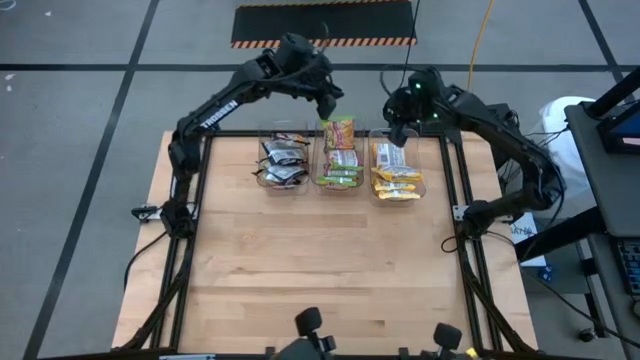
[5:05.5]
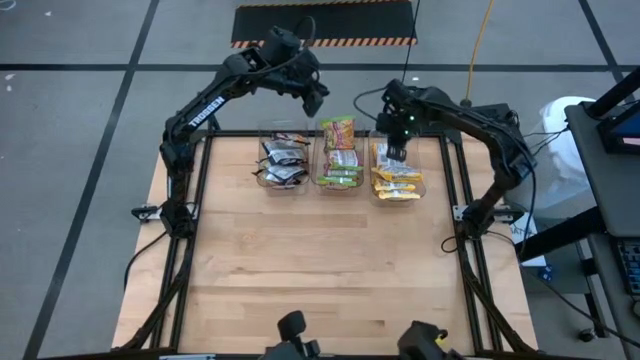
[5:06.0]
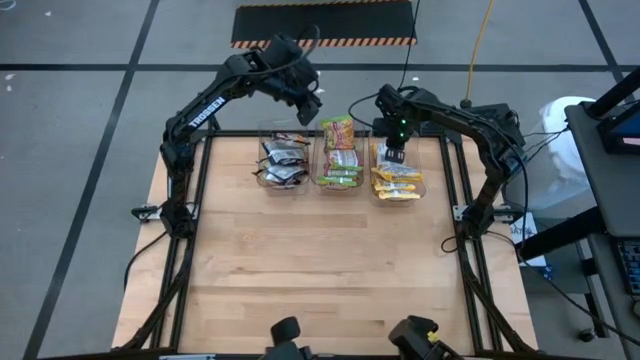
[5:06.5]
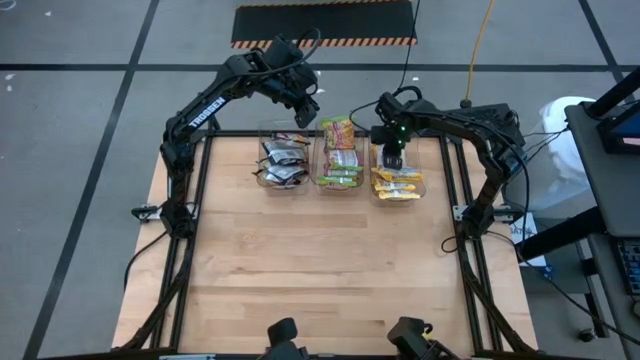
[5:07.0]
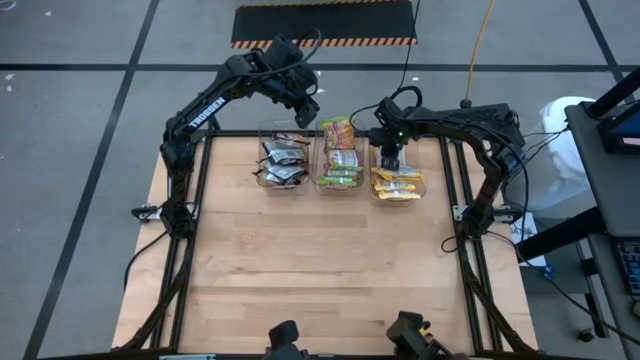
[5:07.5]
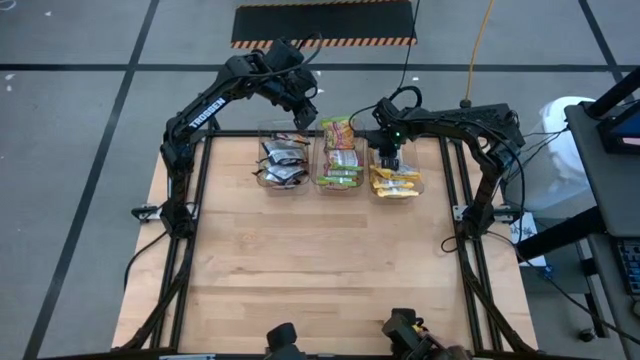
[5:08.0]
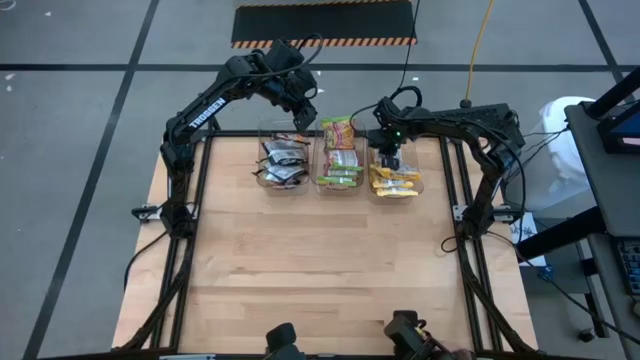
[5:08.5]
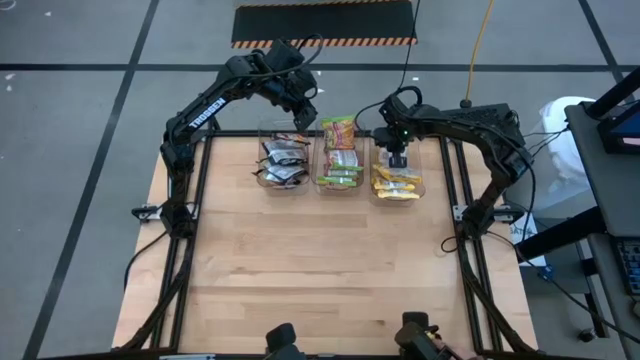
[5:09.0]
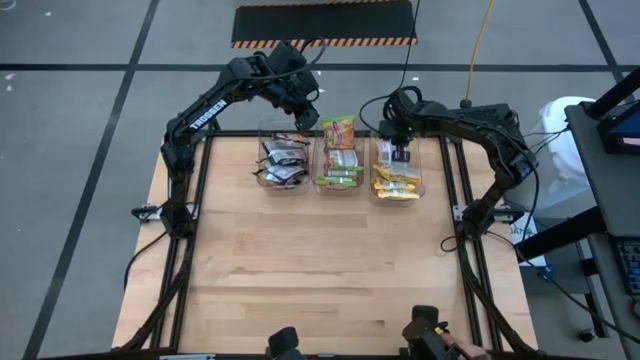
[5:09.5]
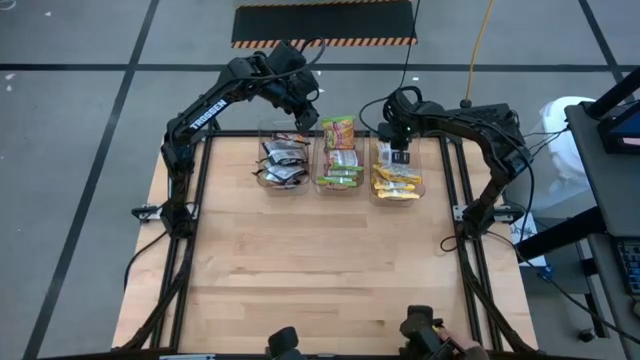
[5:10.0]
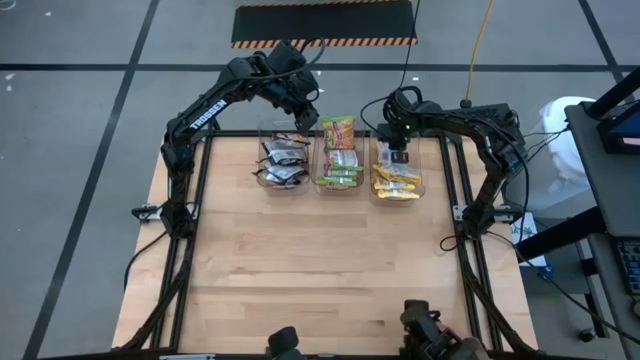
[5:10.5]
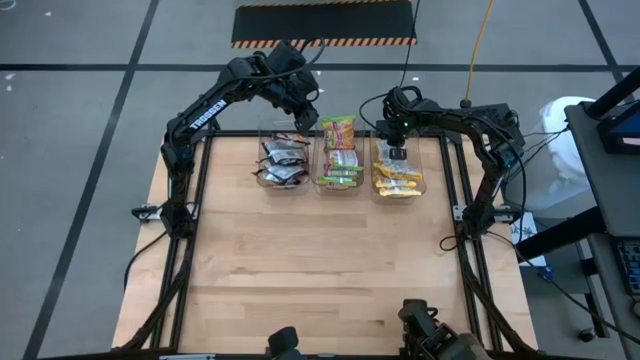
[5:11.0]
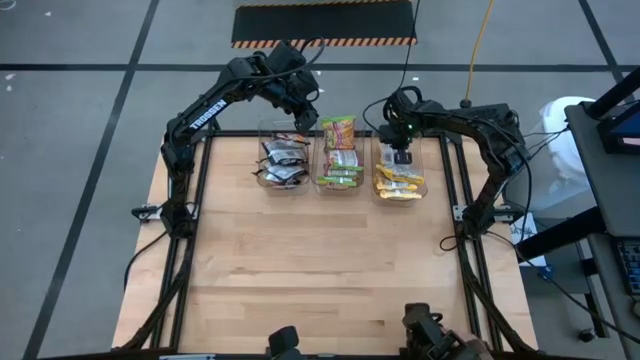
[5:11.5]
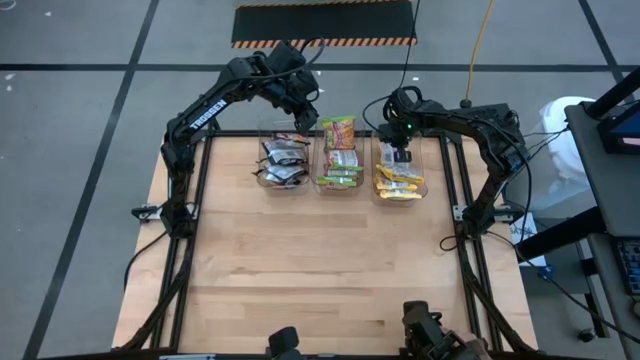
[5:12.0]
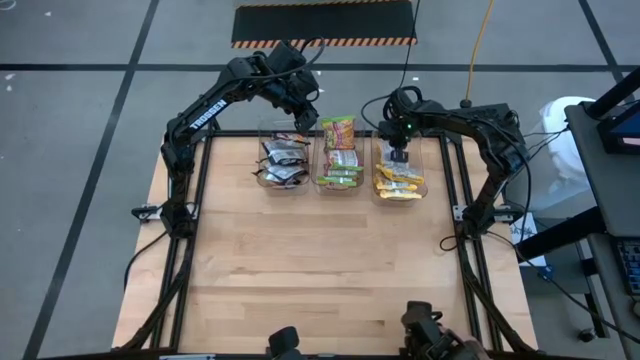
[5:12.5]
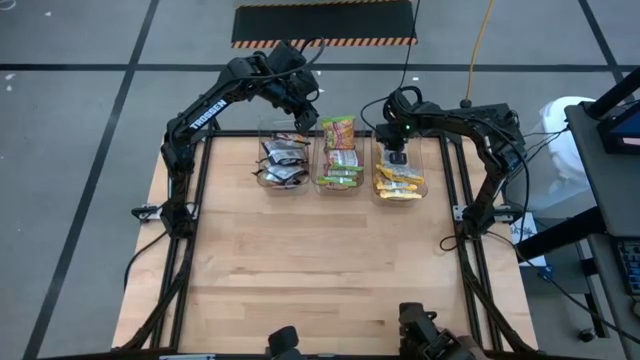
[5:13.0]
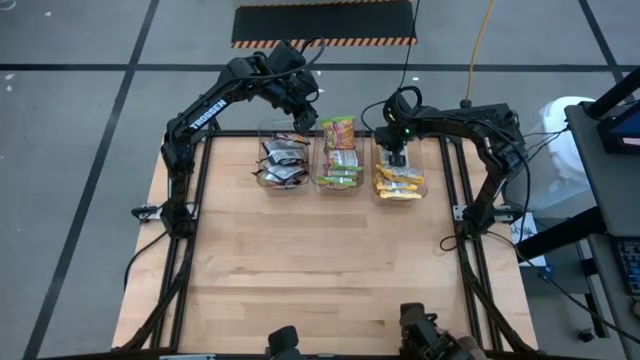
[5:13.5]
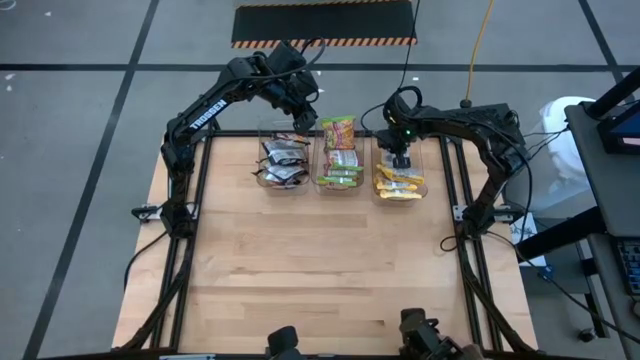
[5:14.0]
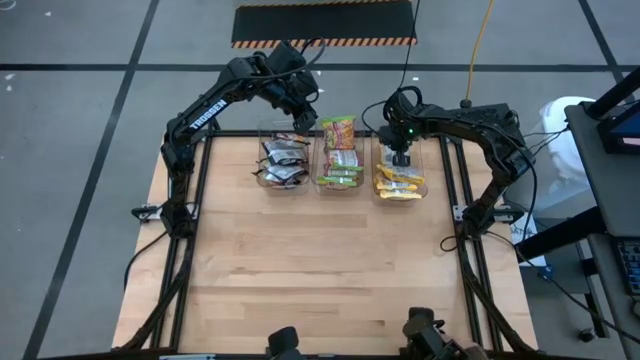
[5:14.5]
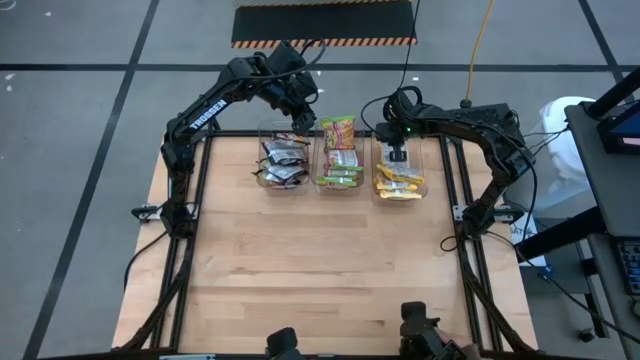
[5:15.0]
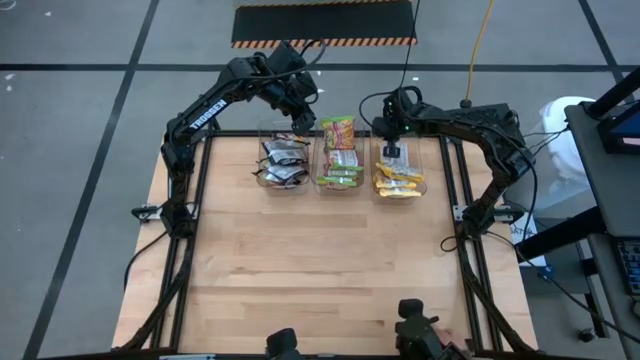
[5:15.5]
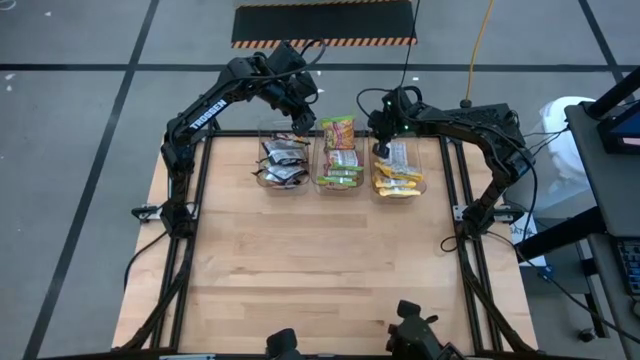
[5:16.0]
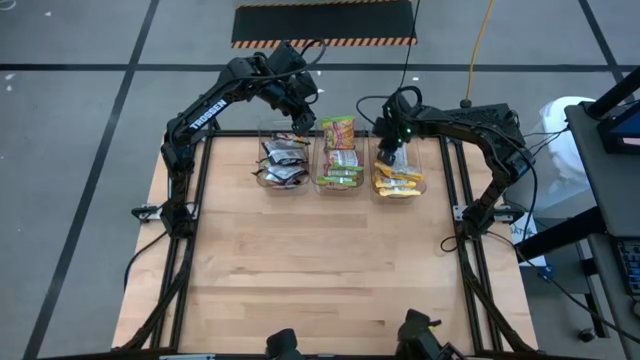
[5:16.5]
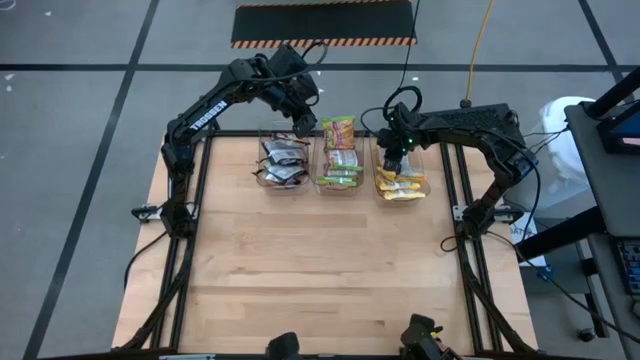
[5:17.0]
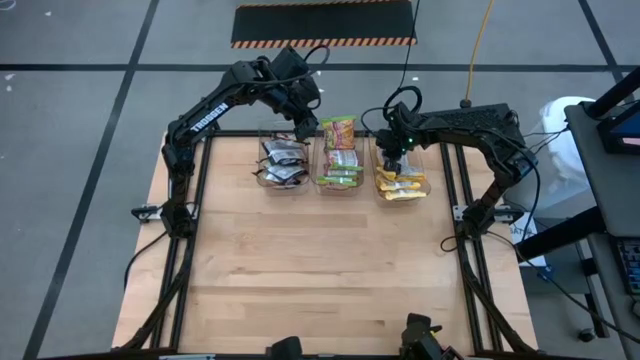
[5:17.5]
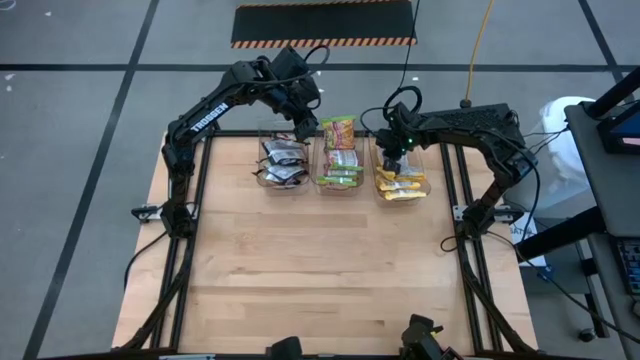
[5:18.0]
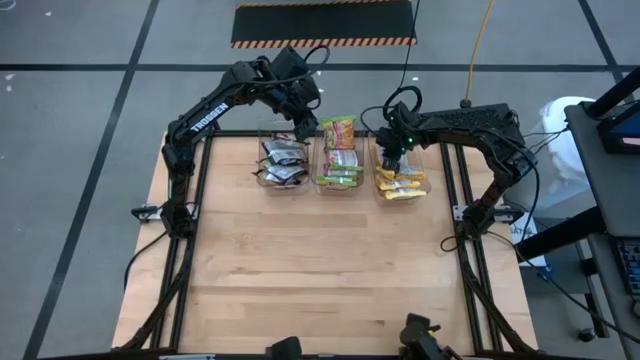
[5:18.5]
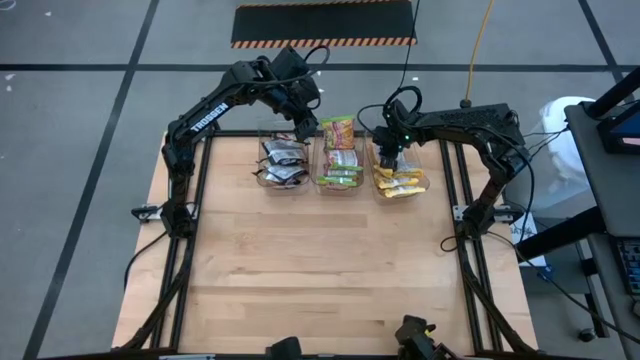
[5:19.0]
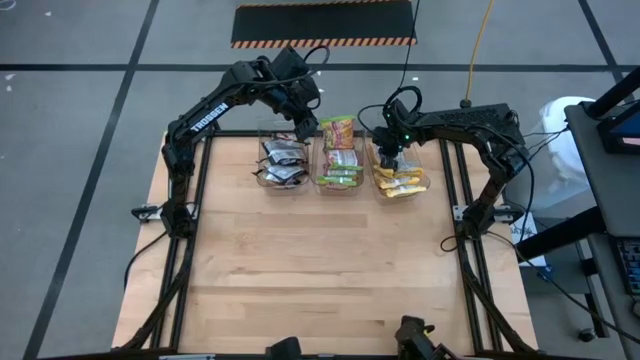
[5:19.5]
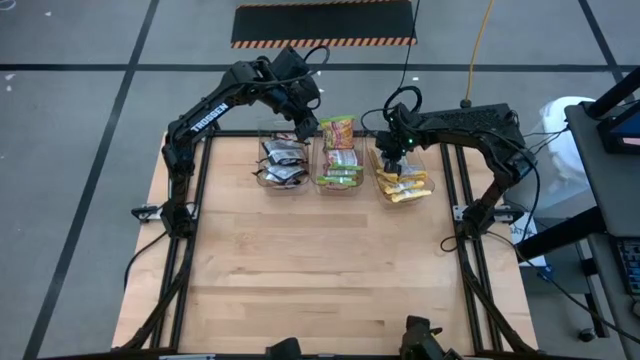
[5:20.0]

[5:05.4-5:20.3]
Task: Sort Maruchan noodles
Adjust the yellow noodle packs in the right transparent bin
